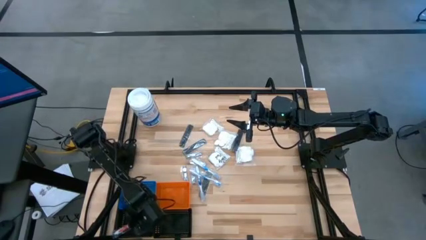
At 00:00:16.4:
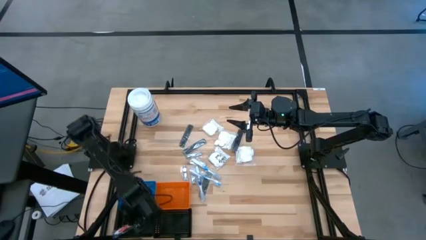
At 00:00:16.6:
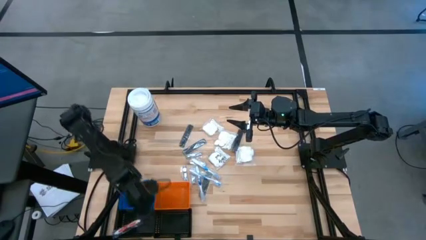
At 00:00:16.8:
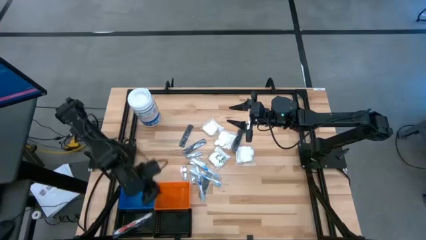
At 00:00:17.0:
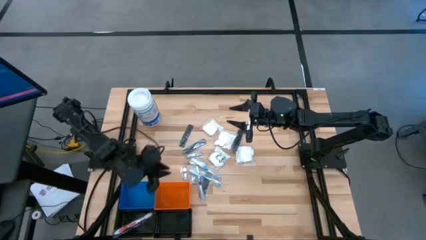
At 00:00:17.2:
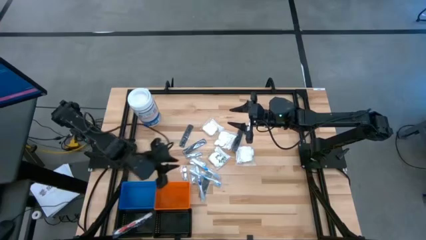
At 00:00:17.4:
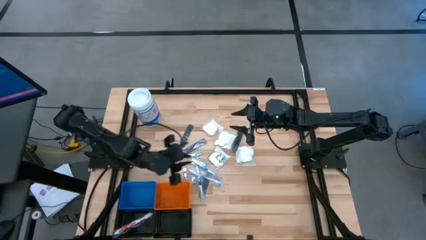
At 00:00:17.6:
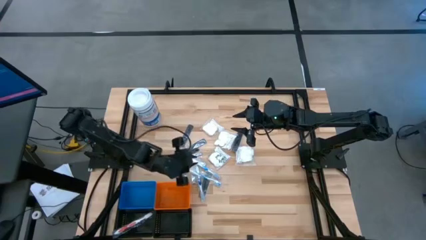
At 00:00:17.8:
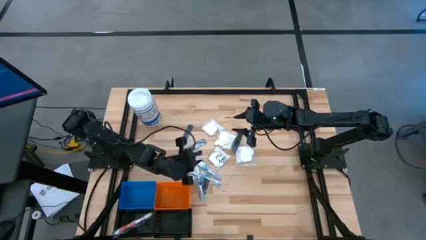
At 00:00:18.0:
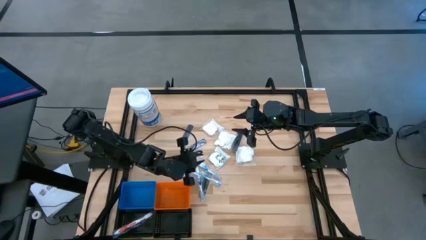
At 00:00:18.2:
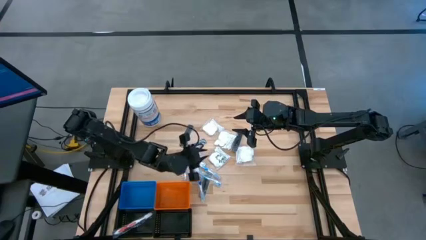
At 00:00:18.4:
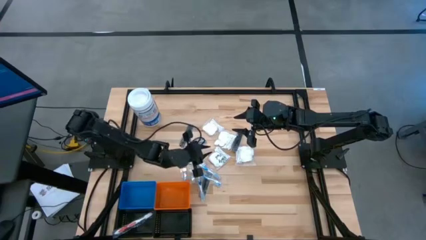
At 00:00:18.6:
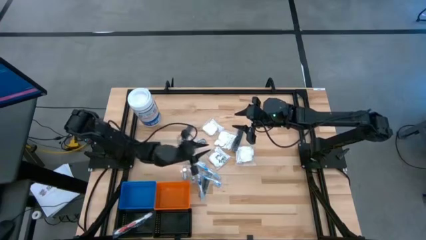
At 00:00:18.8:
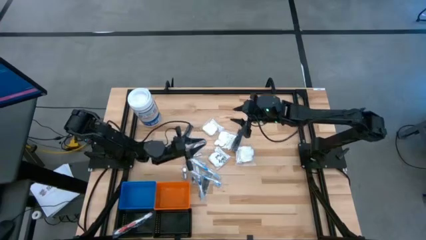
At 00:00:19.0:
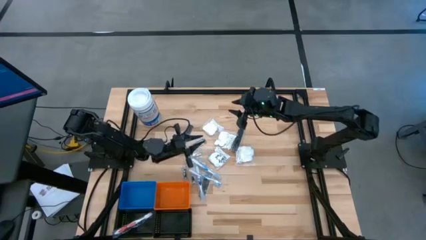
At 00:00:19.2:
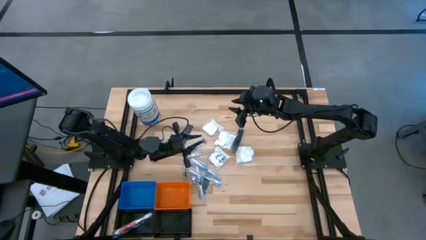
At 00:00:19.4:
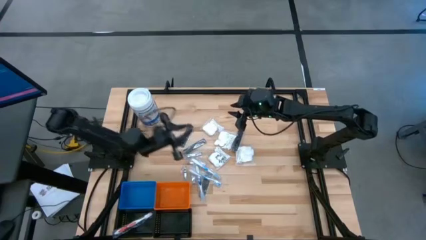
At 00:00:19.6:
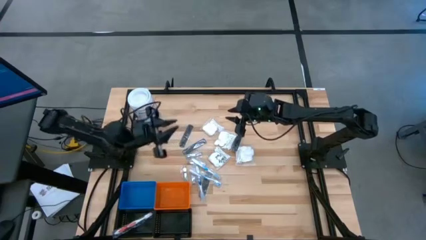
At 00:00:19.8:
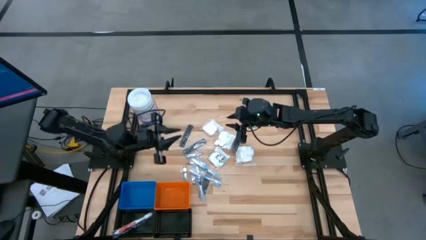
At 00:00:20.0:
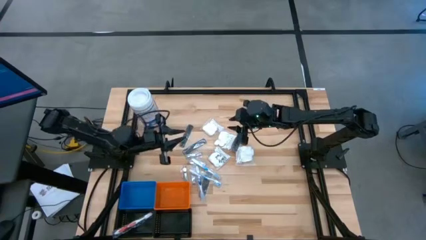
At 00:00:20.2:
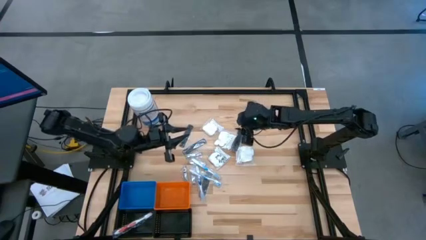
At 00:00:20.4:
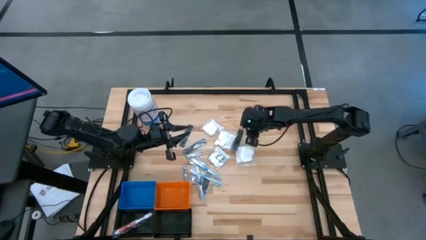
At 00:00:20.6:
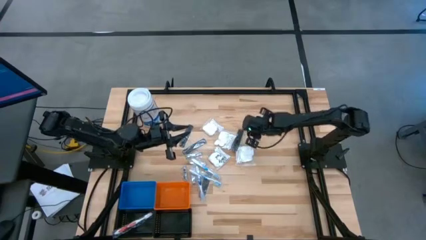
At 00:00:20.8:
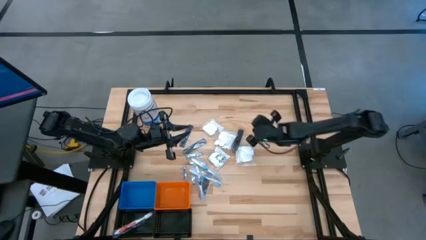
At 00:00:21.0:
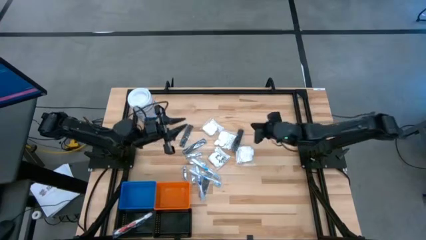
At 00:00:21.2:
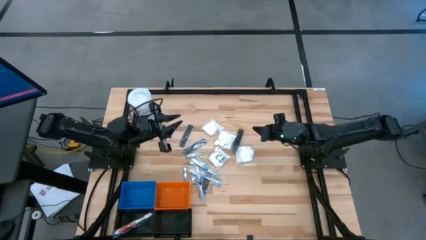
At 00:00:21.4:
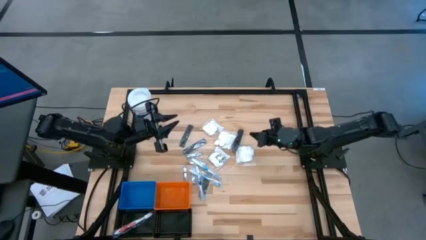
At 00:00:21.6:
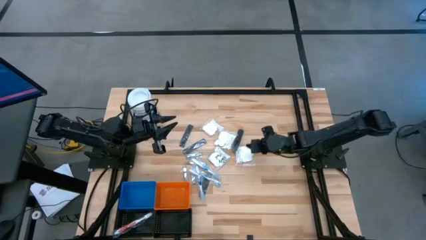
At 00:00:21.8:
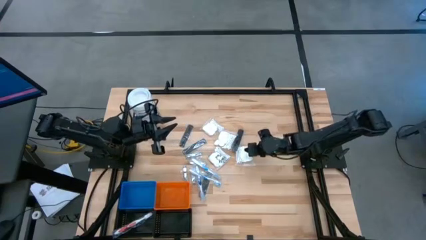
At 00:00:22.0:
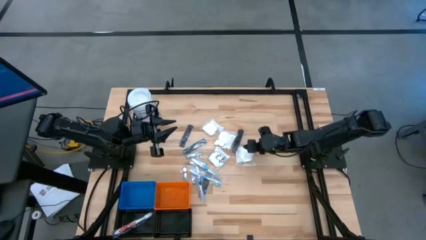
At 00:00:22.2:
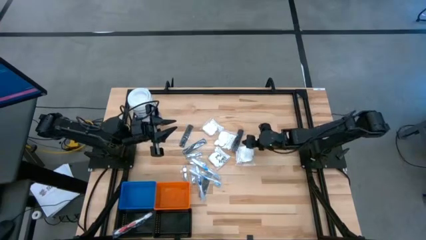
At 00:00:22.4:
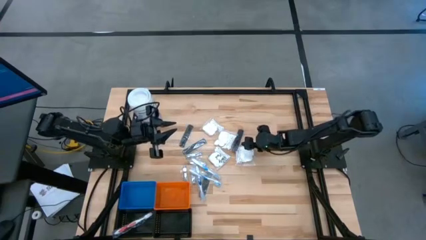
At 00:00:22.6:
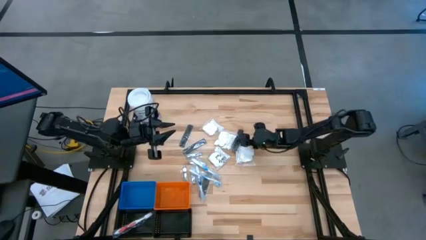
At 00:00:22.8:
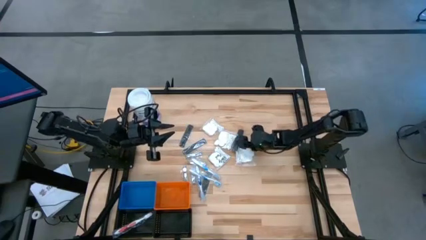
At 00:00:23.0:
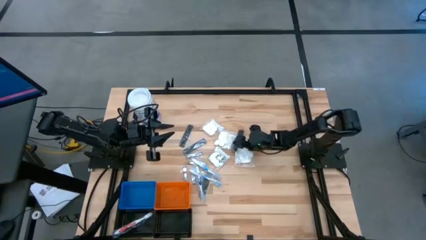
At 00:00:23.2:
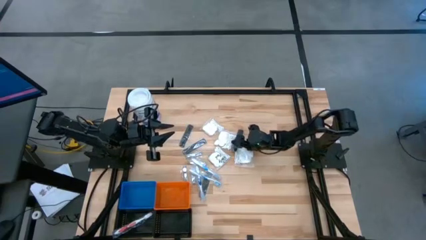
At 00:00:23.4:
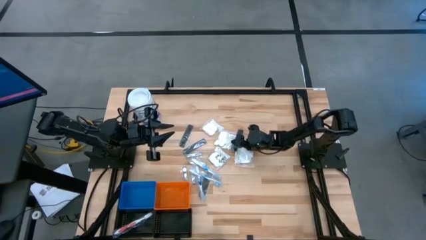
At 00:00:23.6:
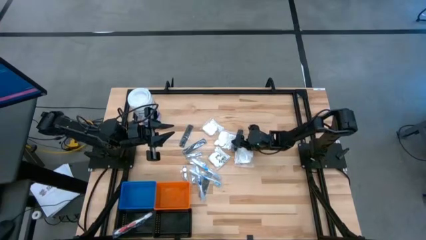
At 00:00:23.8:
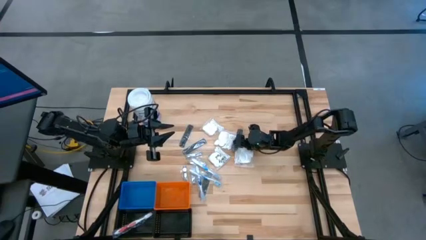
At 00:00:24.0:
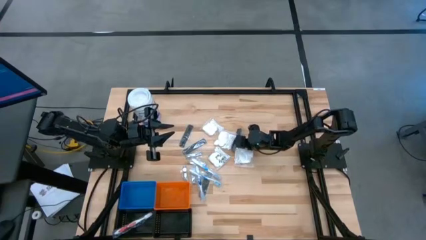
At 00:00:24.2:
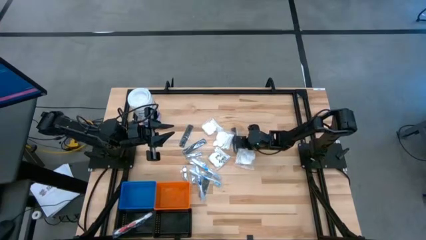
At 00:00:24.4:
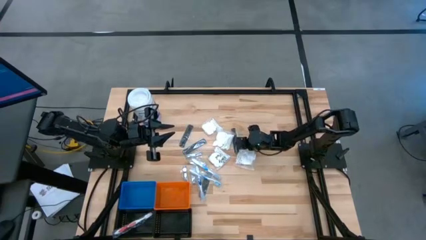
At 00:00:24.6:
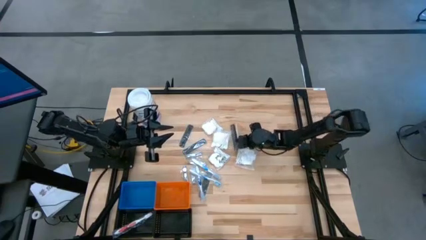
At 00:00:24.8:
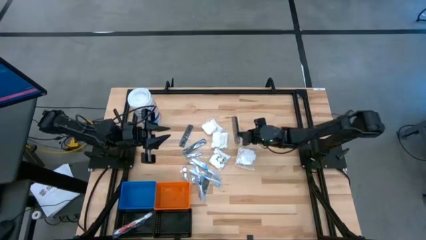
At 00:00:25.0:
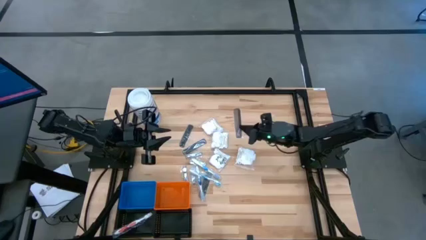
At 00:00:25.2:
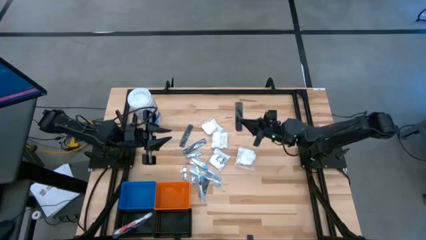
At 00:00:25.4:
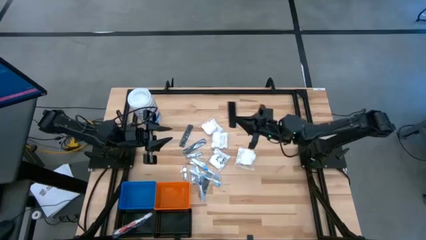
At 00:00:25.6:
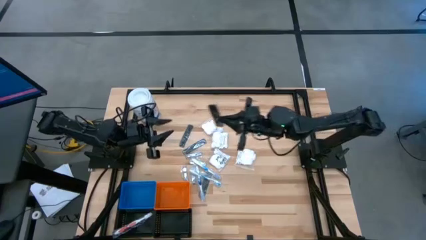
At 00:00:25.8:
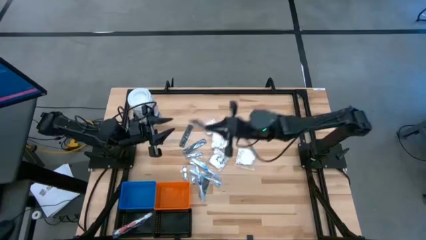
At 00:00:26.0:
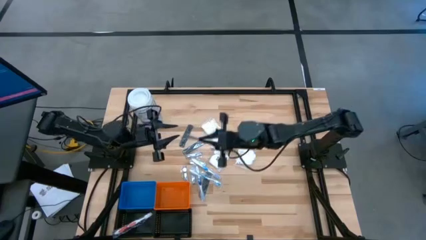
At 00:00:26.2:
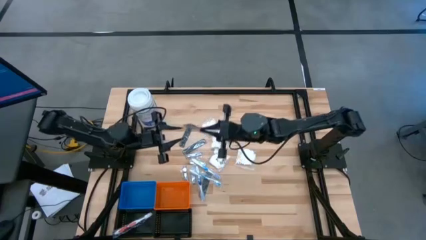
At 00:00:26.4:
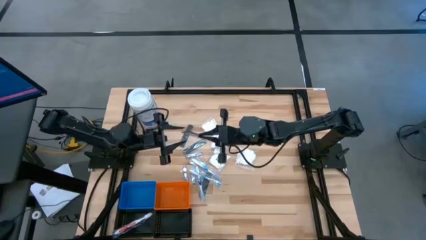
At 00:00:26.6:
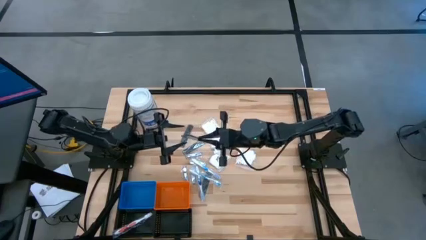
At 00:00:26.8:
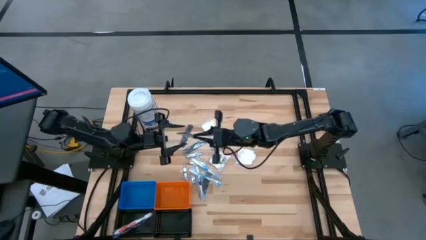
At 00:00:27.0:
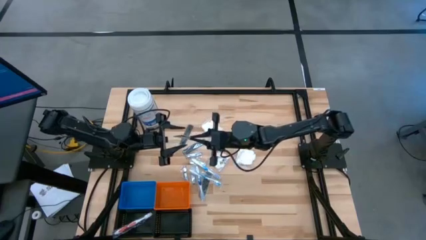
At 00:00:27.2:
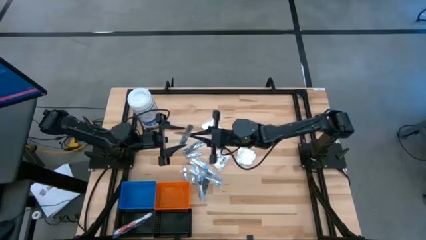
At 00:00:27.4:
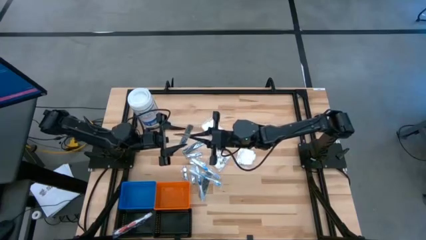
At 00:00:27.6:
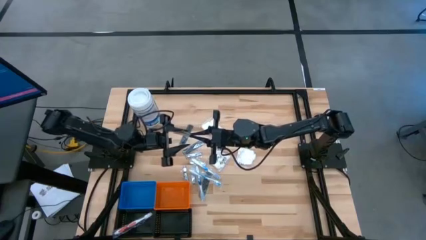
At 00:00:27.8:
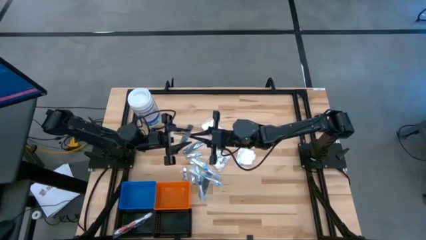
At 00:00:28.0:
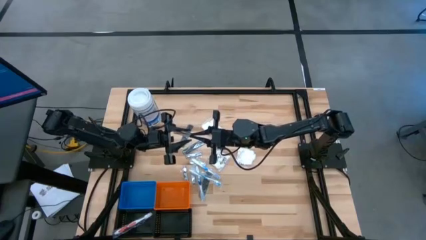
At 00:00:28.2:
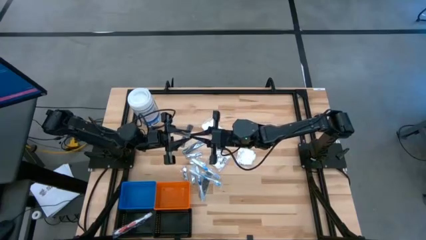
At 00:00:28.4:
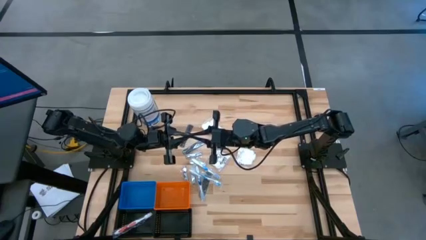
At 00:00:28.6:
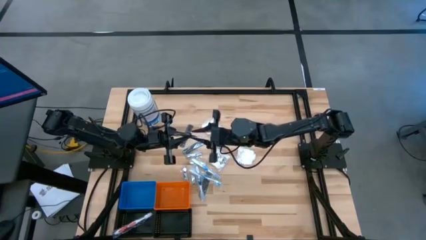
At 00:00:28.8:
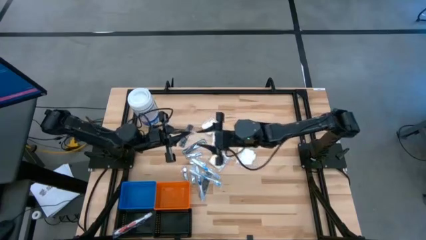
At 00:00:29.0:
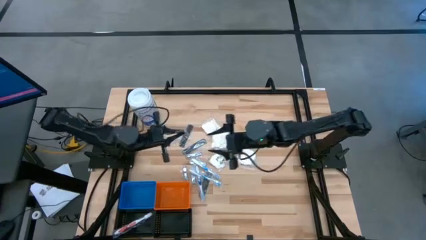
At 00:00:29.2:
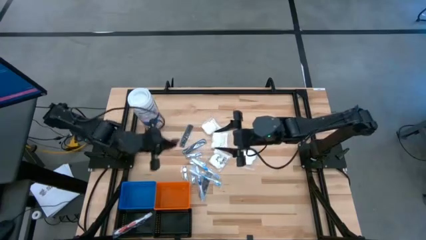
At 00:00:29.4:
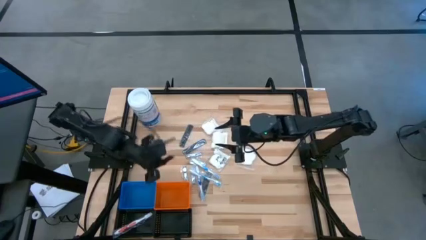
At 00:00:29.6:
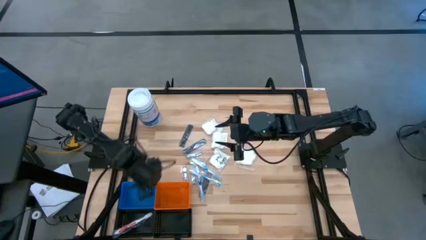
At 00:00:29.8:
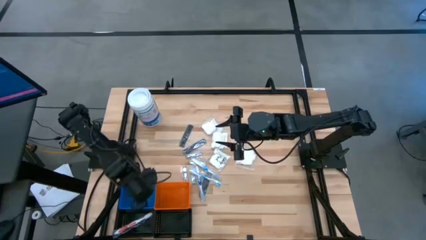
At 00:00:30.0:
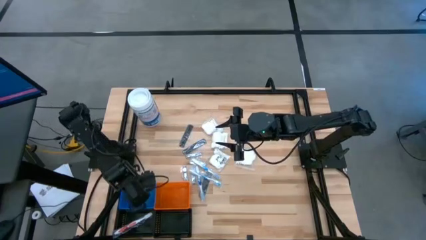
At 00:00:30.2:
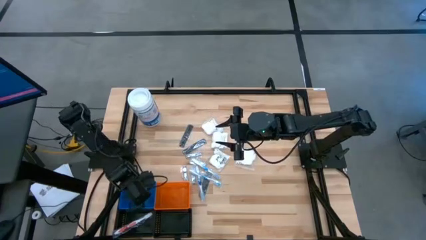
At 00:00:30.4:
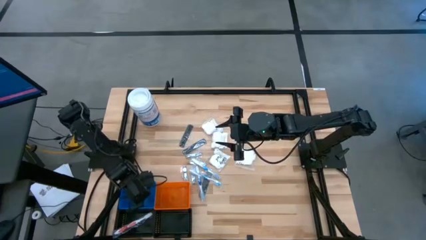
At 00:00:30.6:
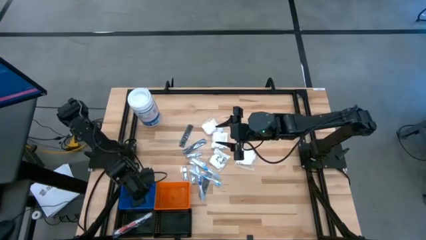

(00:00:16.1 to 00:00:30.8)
Task: Pick & Place Travel size toiletries
Put the top right black comb into the blue basket

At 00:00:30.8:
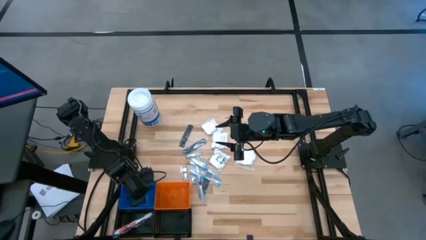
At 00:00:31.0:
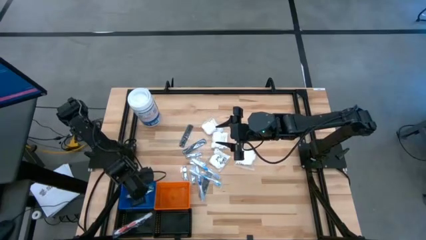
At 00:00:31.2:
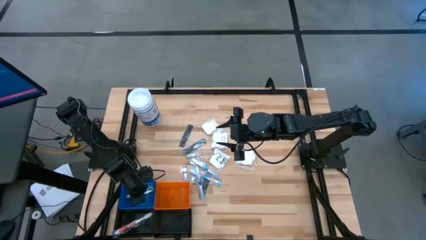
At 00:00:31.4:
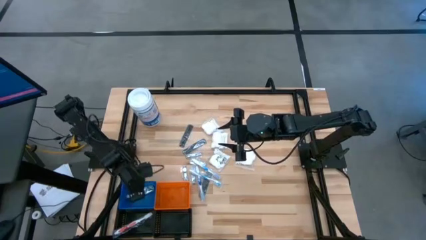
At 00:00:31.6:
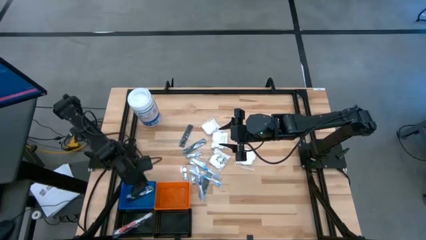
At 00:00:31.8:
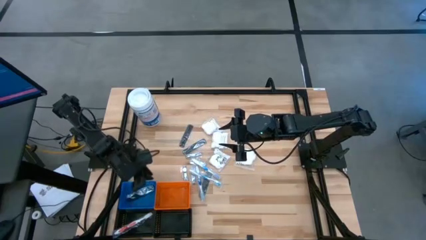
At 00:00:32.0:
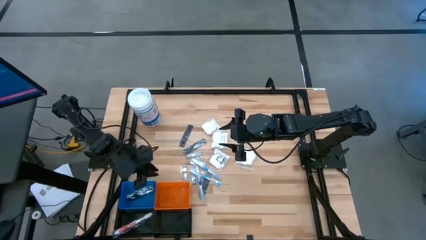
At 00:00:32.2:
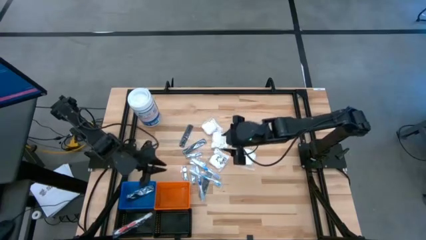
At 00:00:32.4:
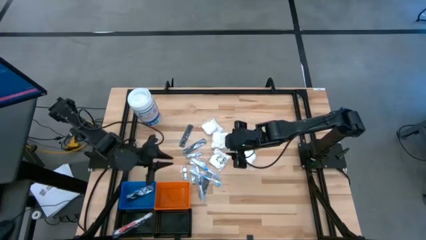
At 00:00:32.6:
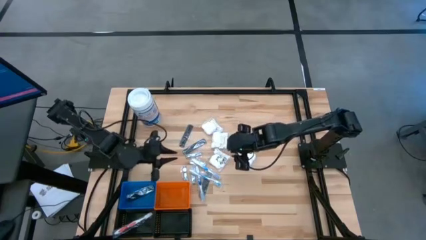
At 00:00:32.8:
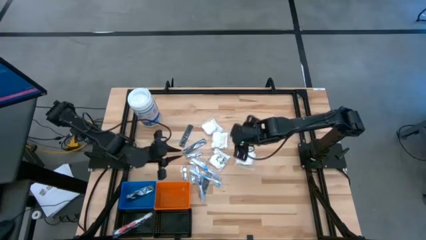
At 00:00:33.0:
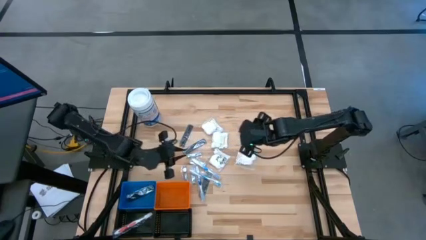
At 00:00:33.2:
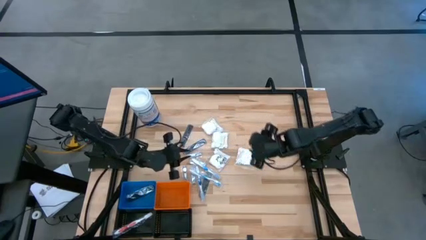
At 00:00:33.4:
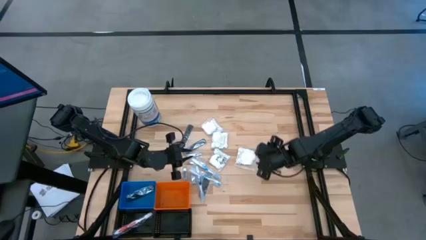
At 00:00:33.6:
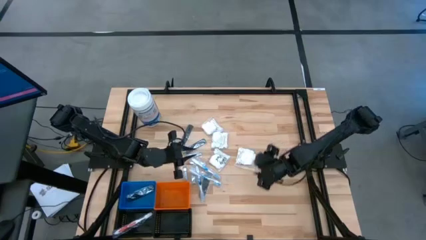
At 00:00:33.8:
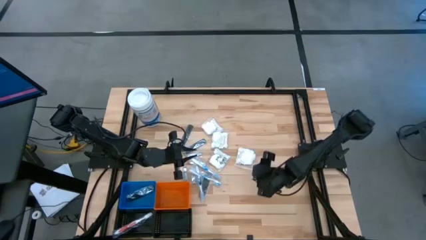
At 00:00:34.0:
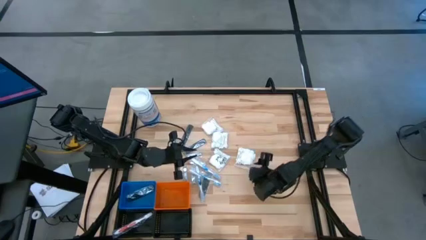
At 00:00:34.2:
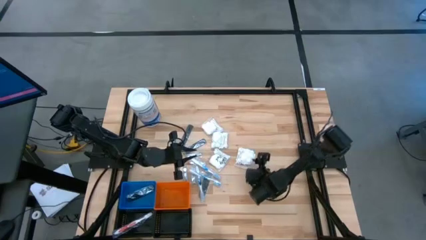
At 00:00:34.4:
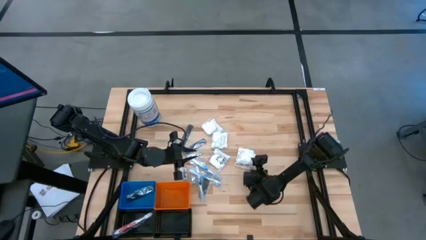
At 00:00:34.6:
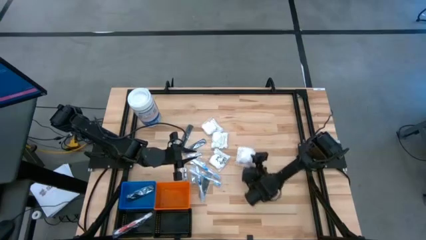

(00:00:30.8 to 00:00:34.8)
Put the cotton pack into the right black basket
